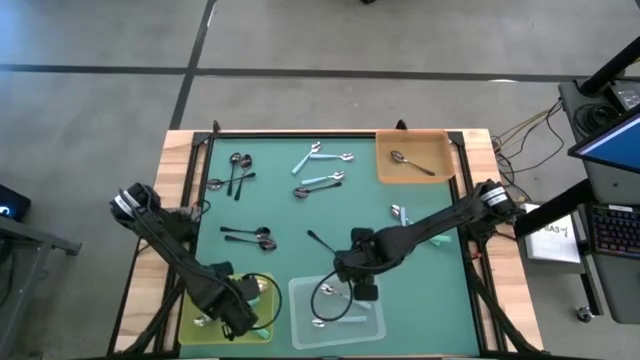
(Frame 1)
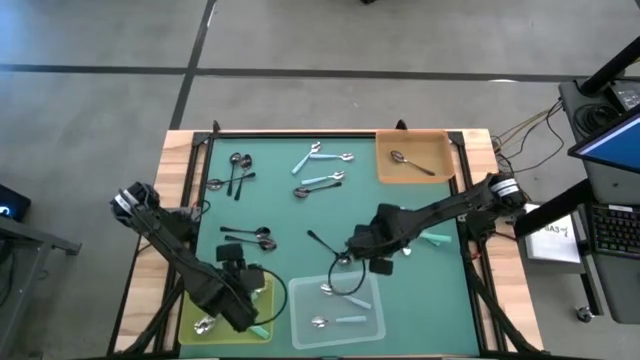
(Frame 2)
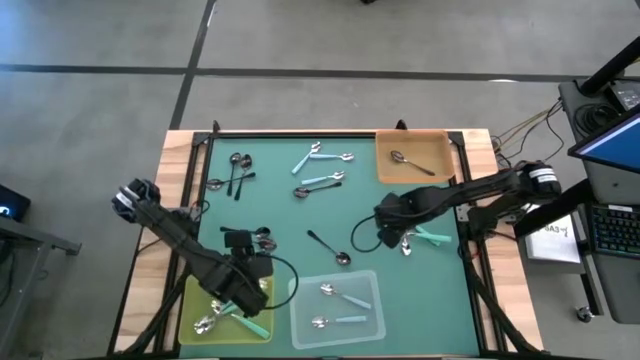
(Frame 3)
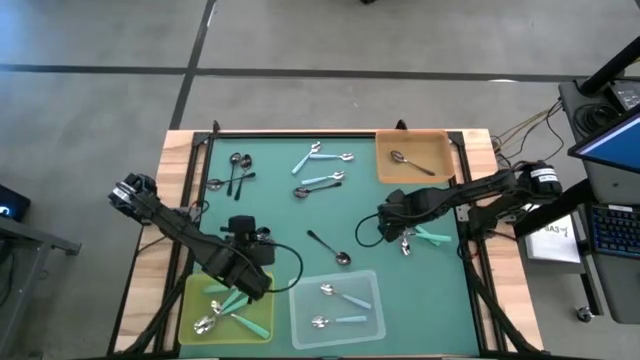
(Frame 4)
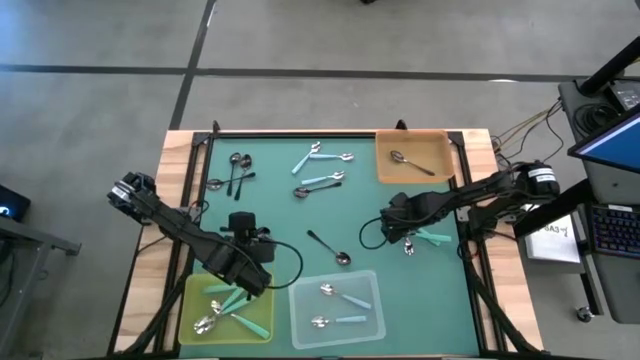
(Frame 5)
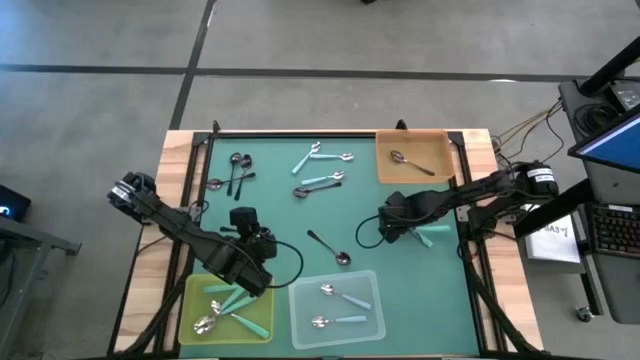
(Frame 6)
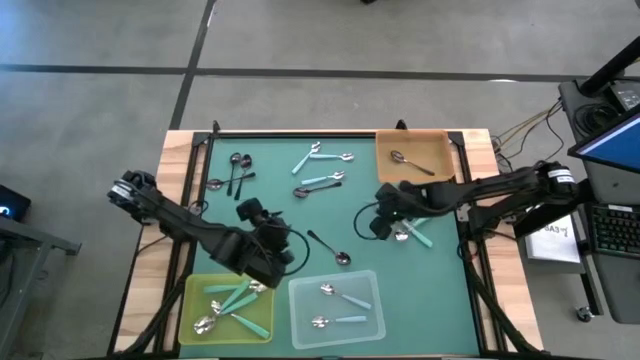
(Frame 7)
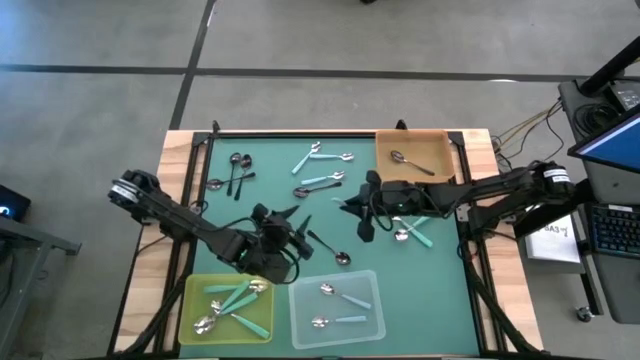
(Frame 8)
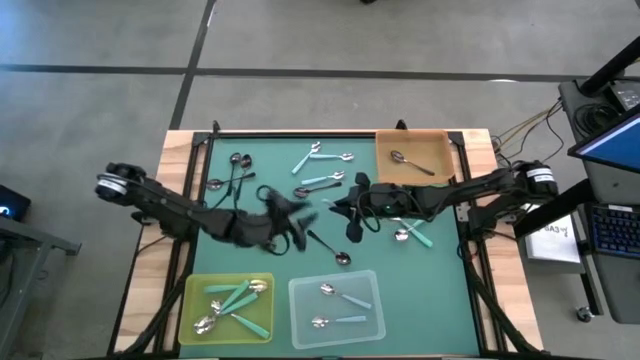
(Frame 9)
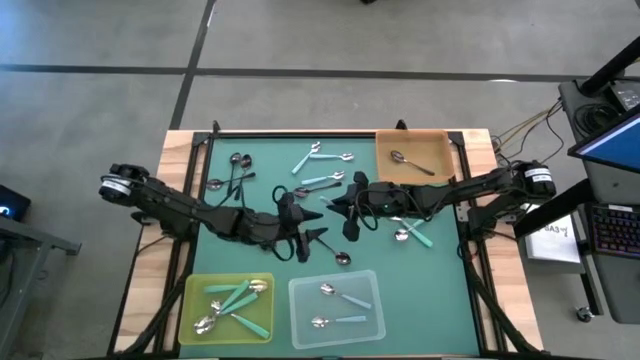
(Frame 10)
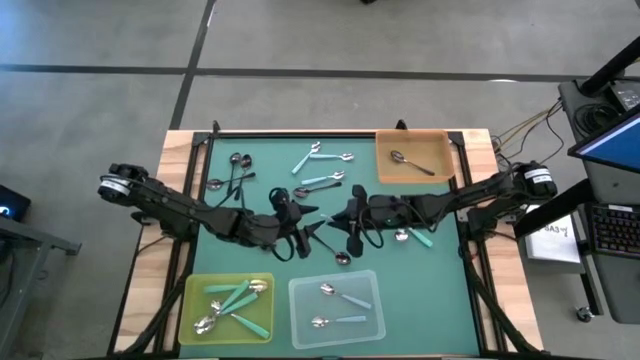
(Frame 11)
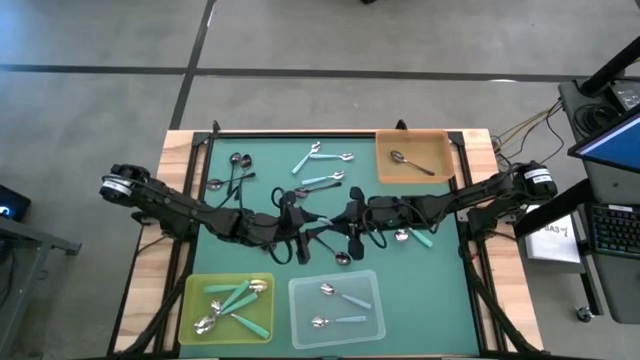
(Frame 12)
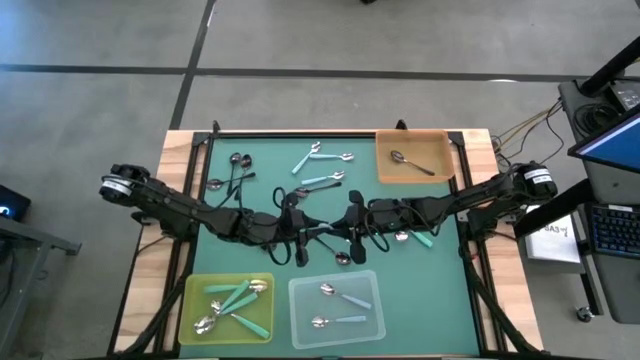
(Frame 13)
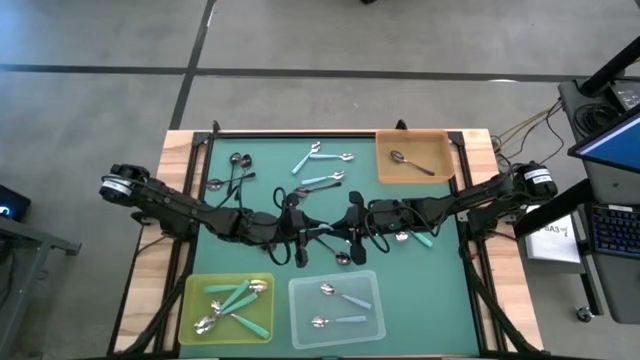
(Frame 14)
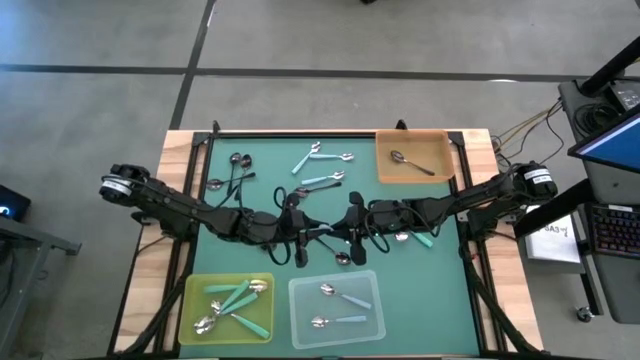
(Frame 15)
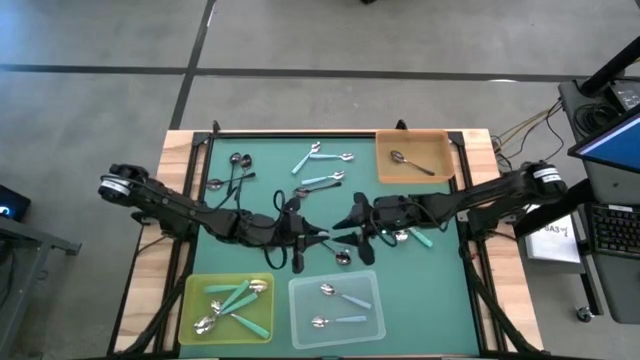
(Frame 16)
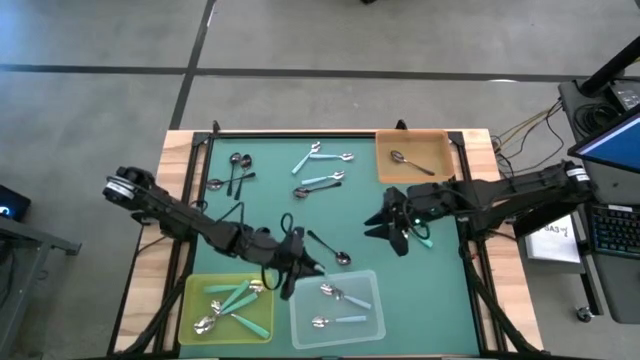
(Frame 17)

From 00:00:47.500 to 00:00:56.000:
Task: Sort silverware by color (type)
Put the blue spoon into the transparent bin

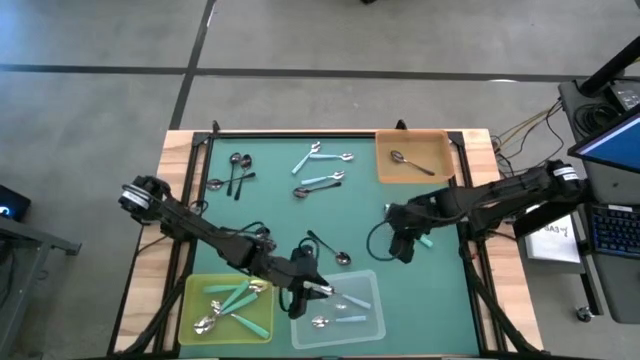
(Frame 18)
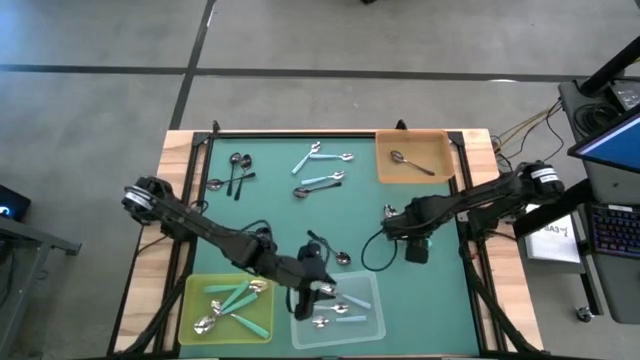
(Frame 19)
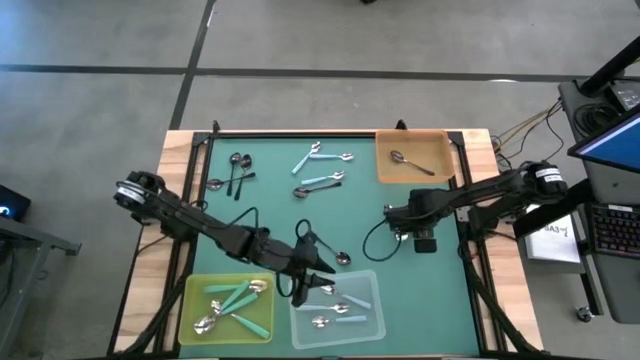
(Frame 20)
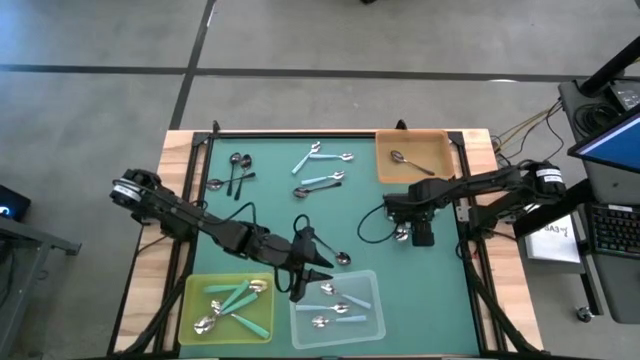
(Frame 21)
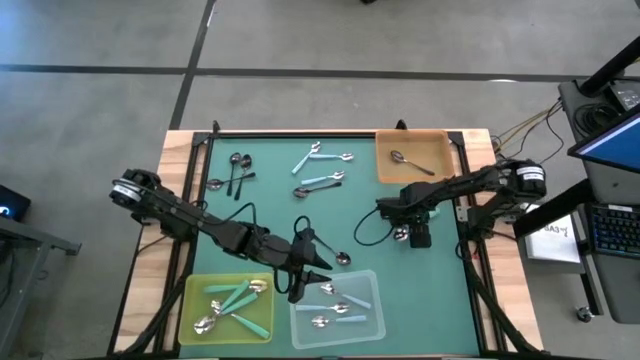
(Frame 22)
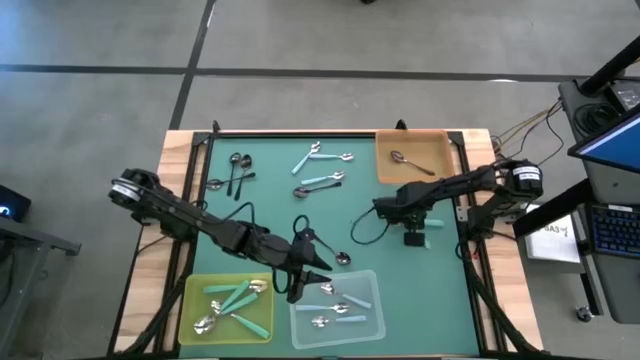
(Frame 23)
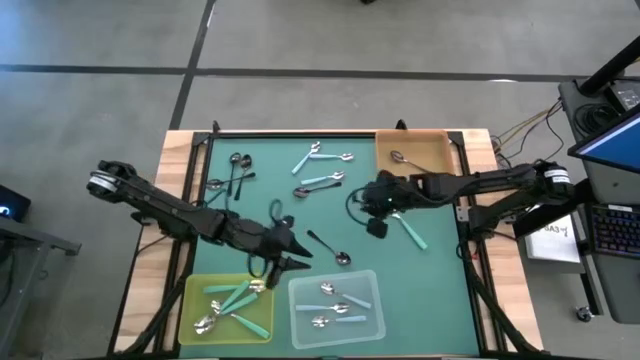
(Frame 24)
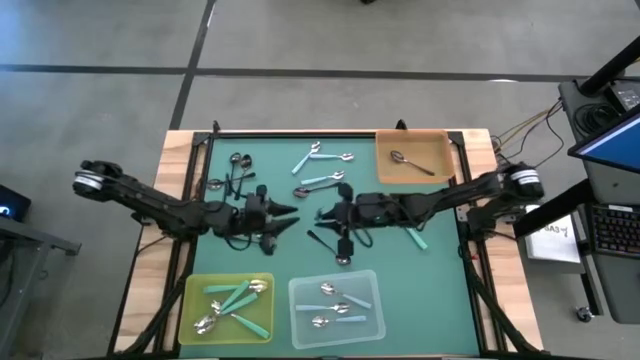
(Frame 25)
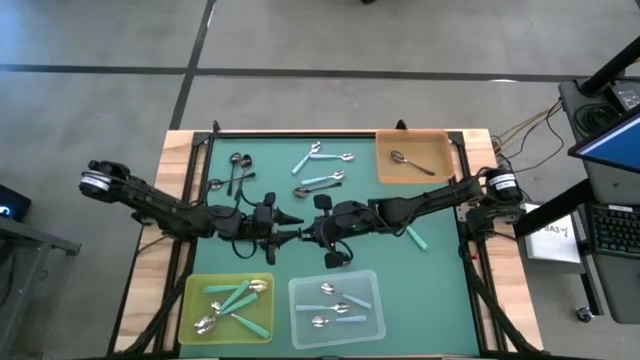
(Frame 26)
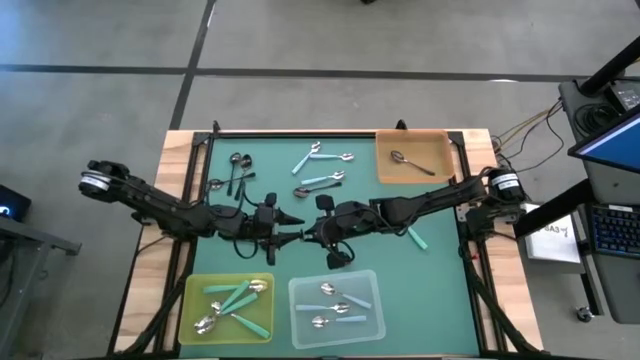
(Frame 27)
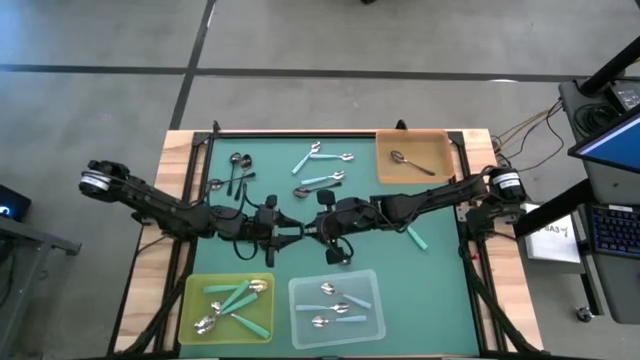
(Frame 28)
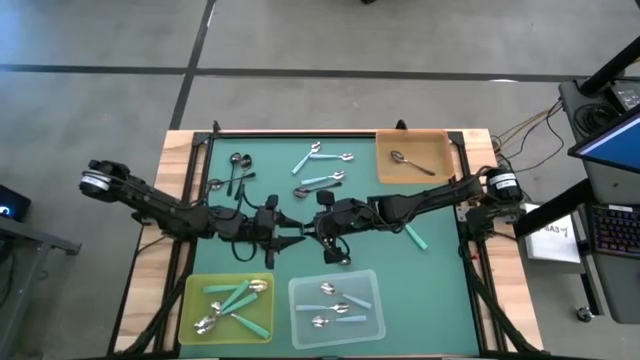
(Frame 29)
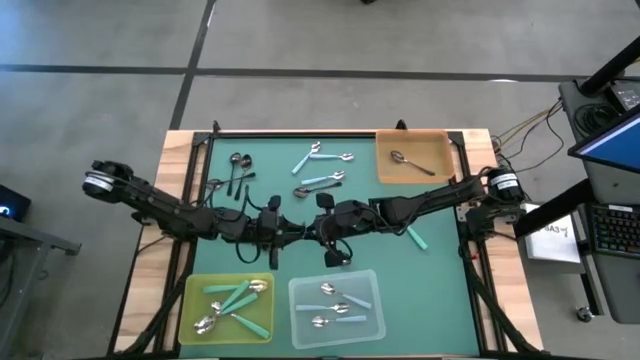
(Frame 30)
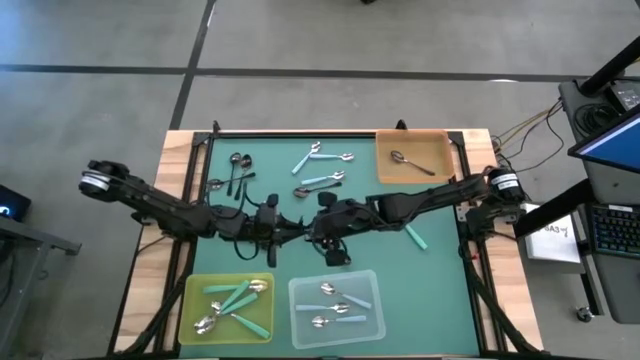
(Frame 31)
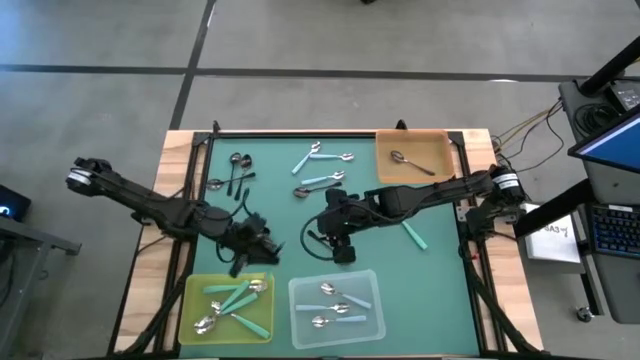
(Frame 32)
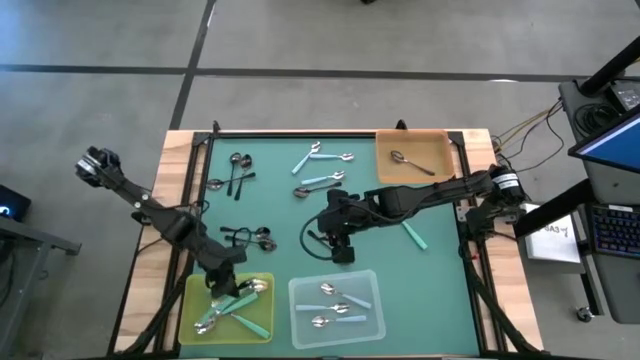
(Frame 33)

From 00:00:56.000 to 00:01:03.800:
Put the green spoon into the yellow bin

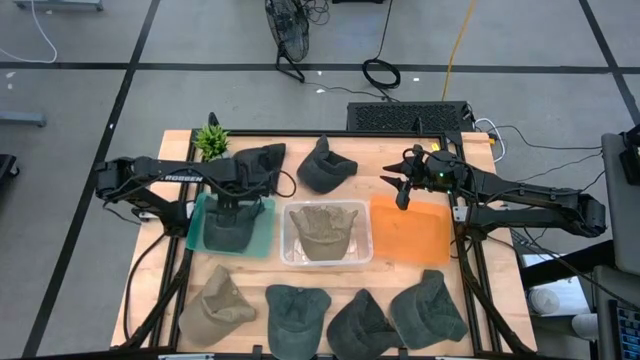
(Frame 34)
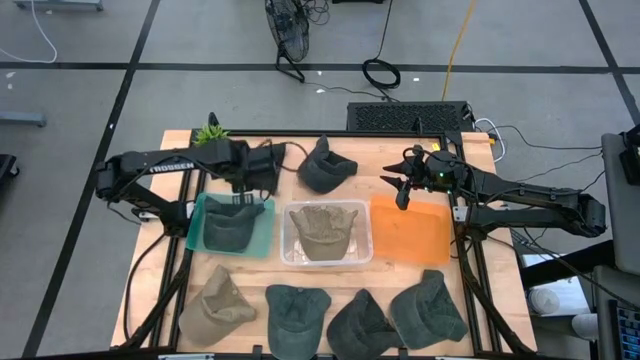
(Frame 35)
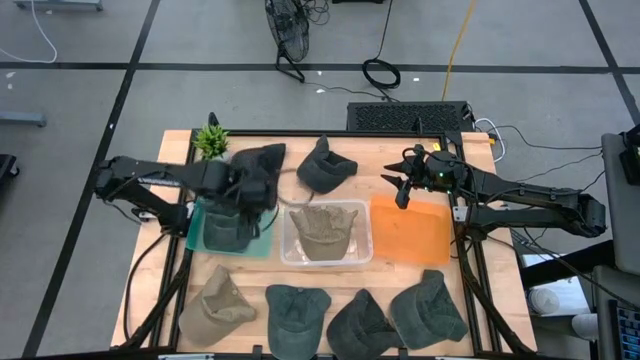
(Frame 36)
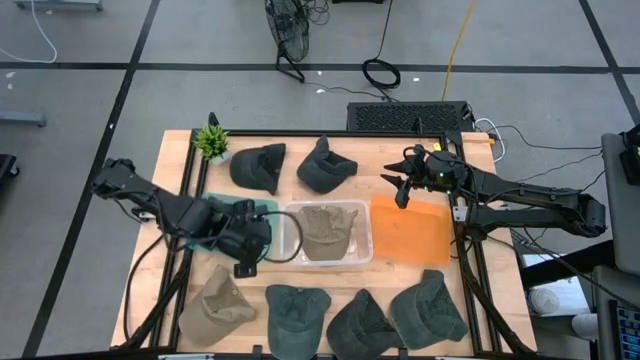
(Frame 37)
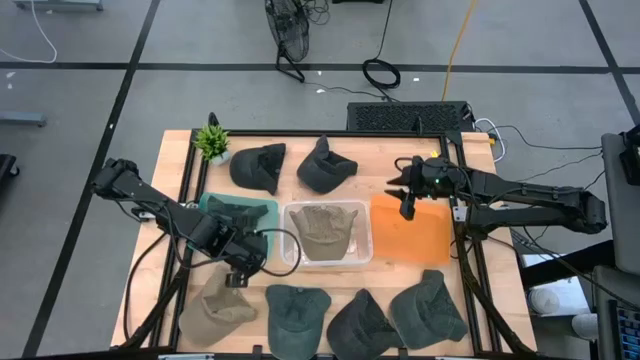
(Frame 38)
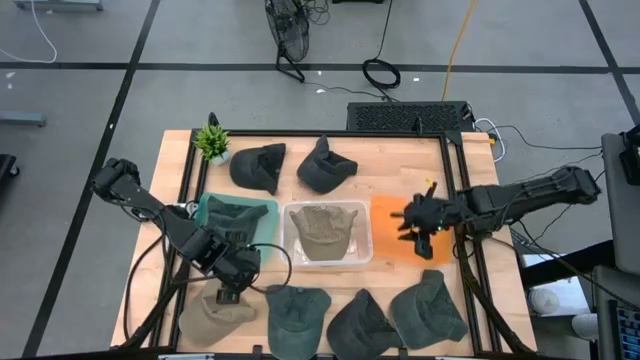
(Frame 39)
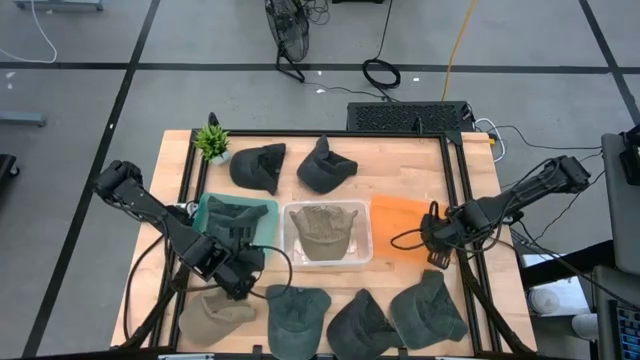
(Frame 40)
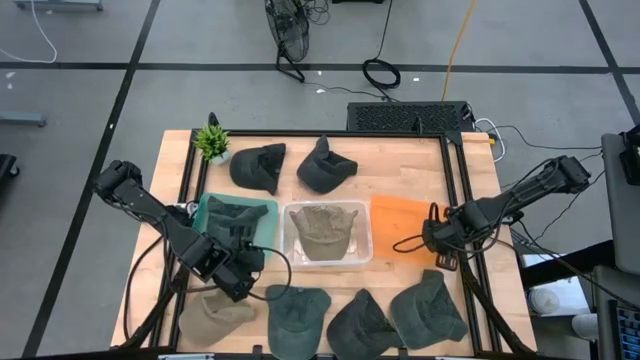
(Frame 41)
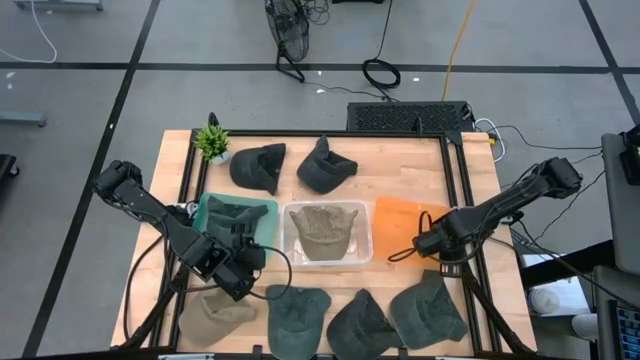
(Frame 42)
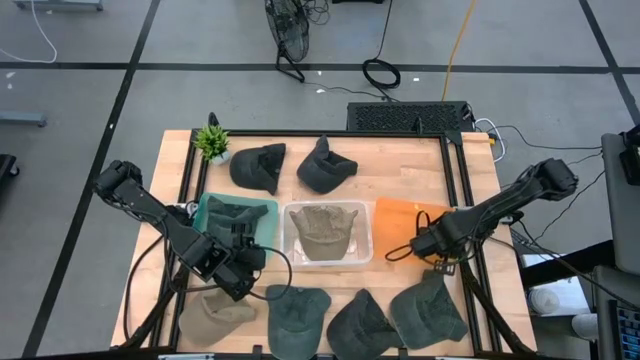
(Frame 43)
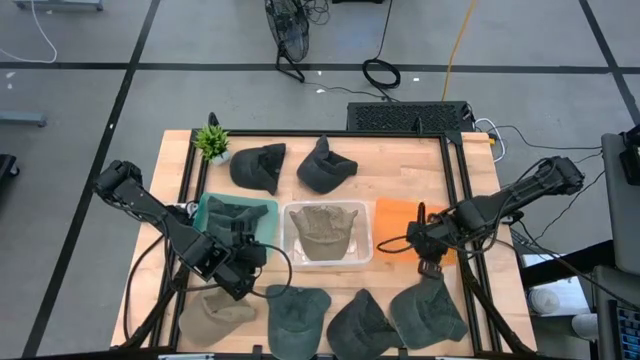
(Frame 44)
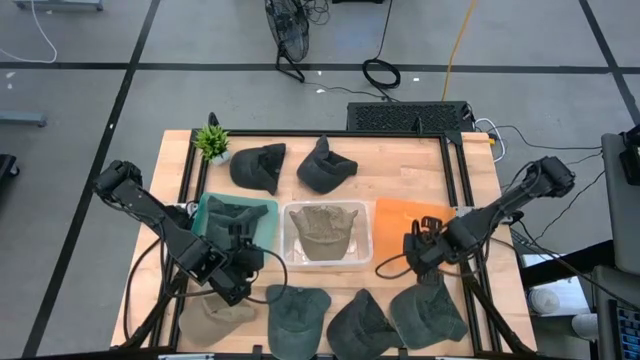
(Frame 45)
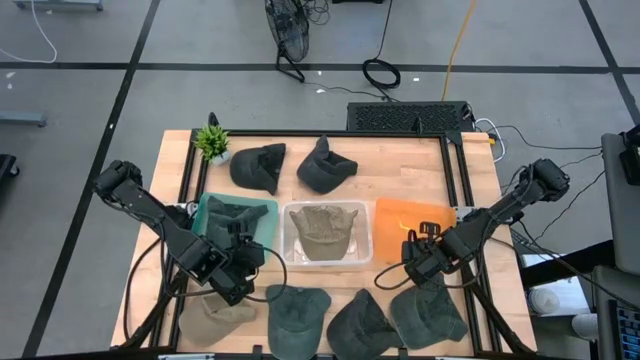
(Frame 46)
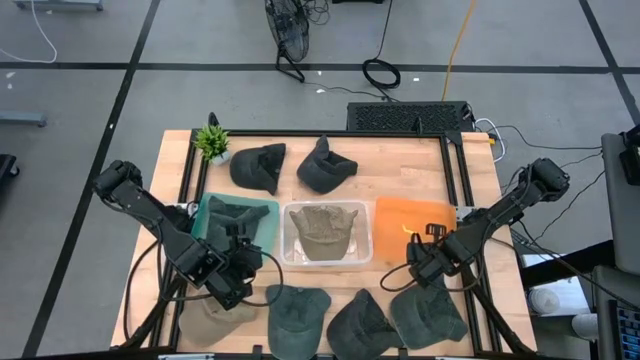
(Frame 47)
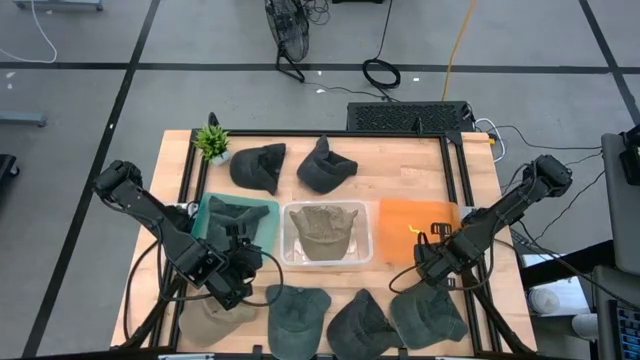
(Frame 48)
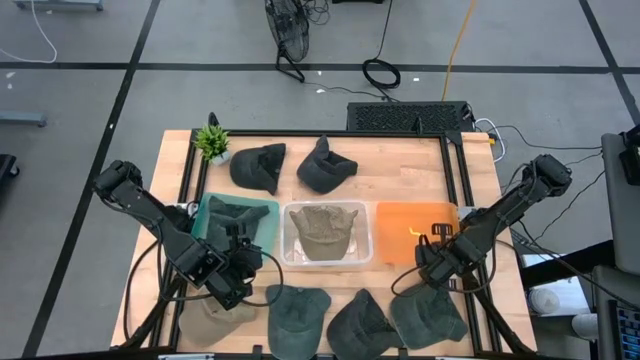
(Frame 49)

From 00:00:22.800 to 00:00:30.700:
Task: Pick & Place hat
Adjust the orange bin
